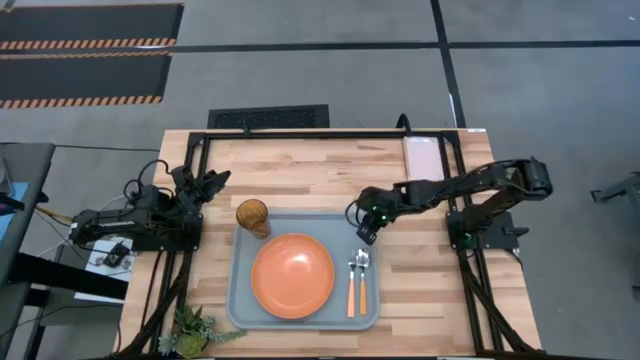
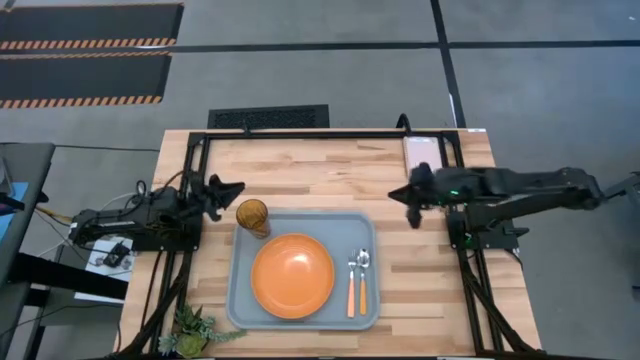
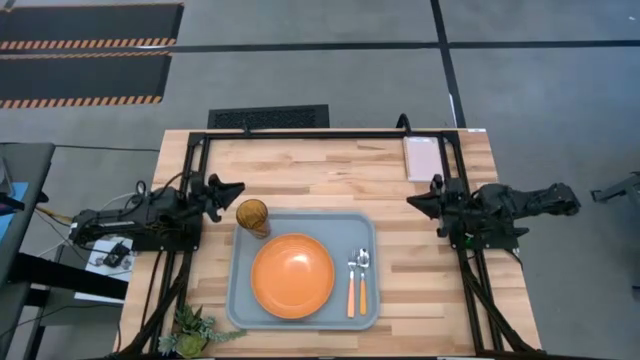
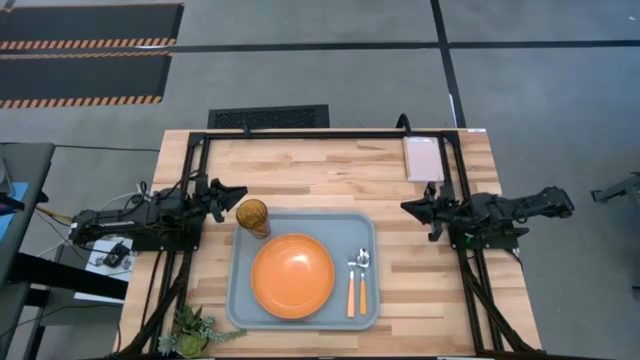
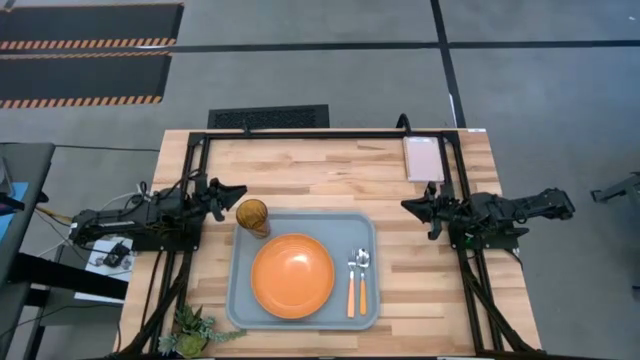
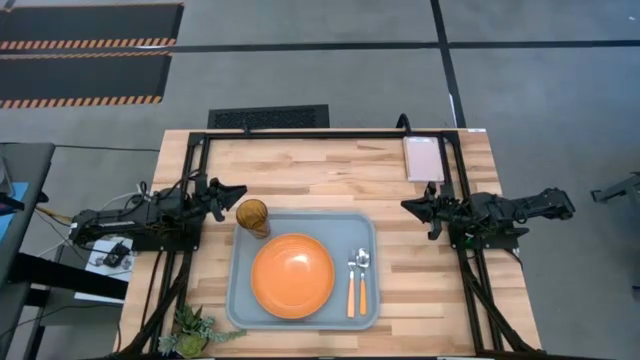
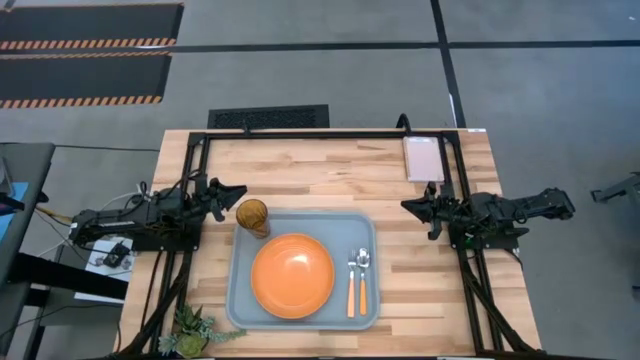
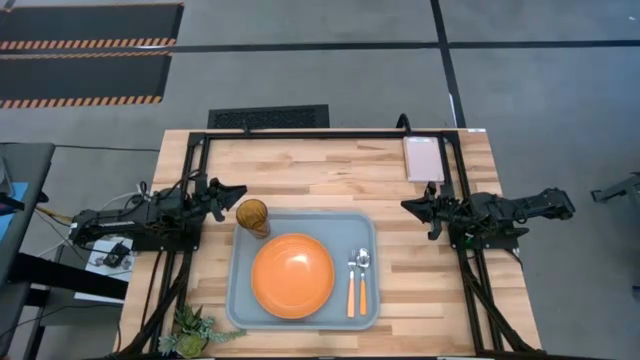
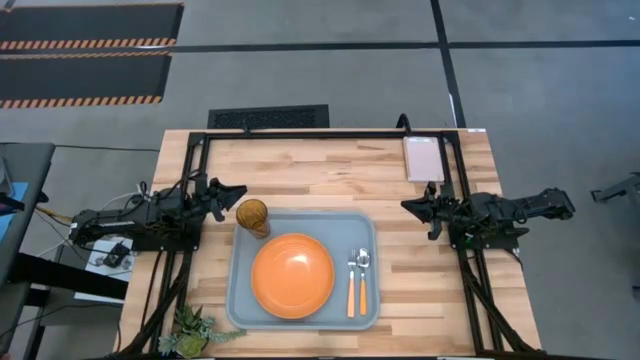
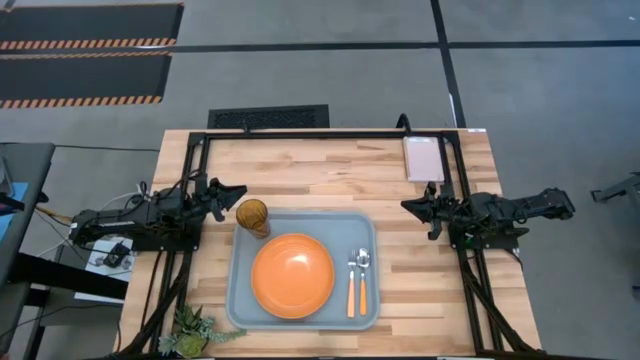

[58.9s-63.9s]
Task: Pick and place plate/cup/fork/spoon on tray
Return to Home Position

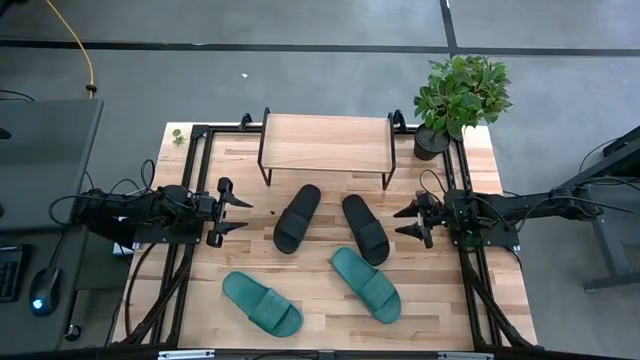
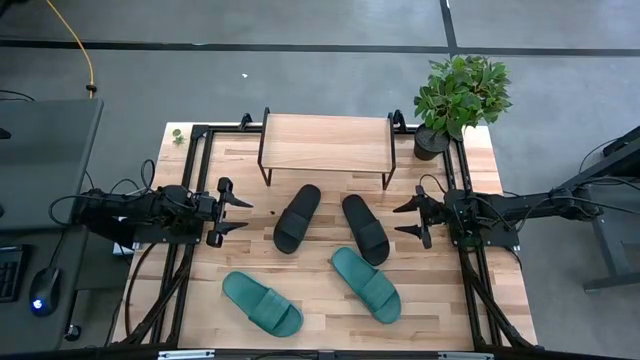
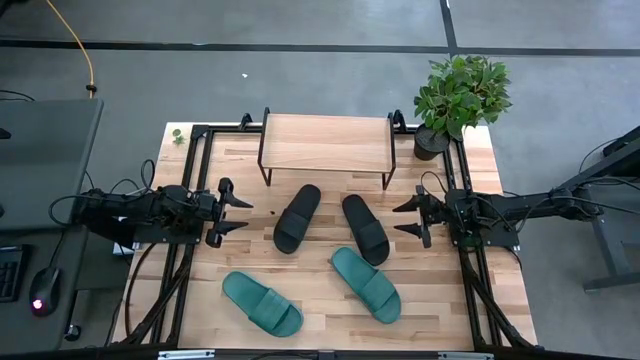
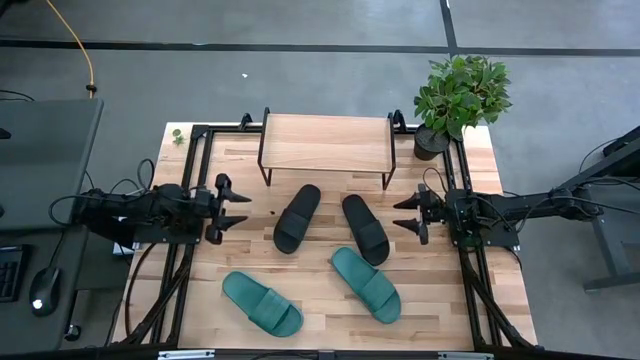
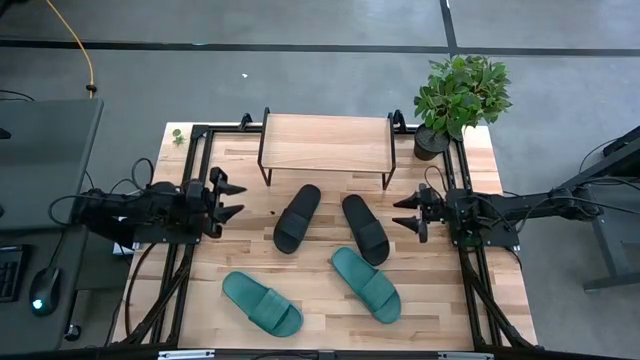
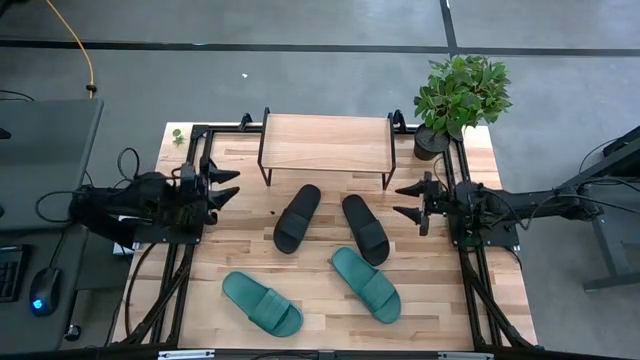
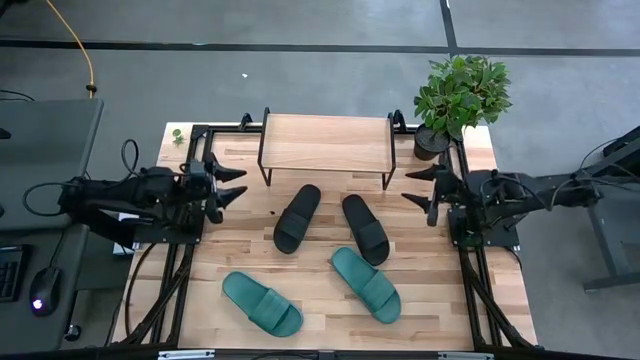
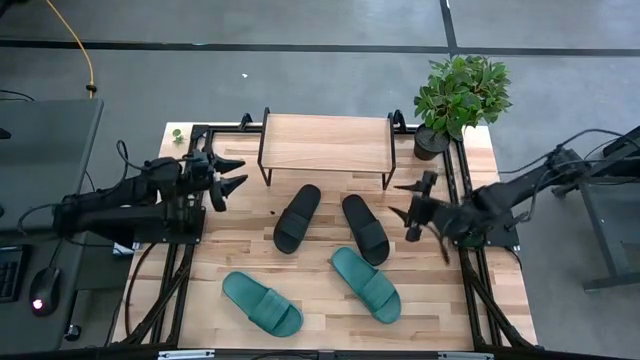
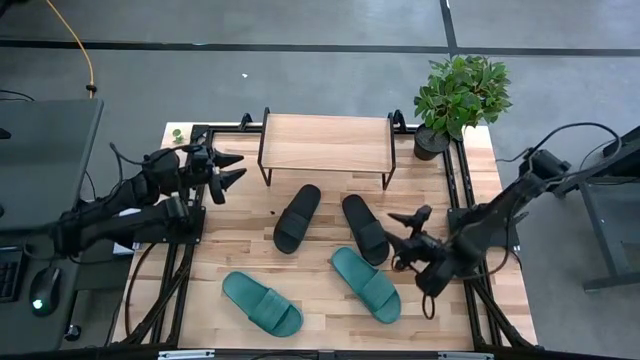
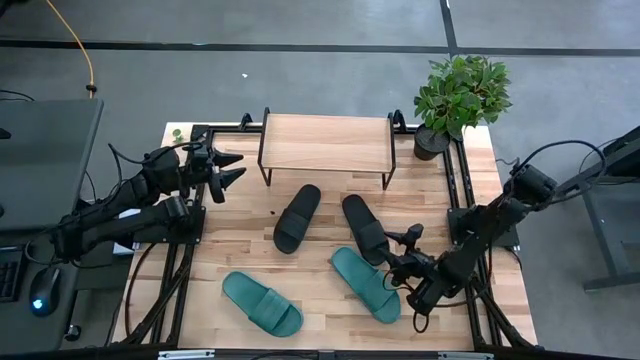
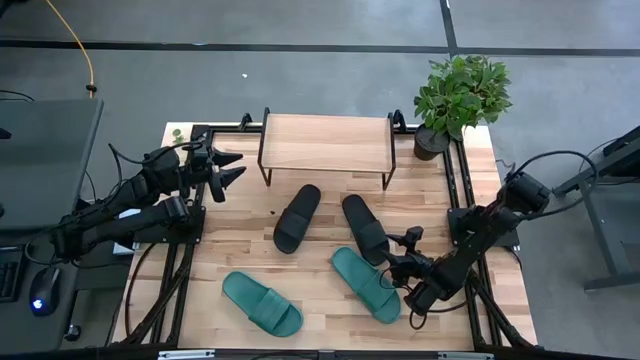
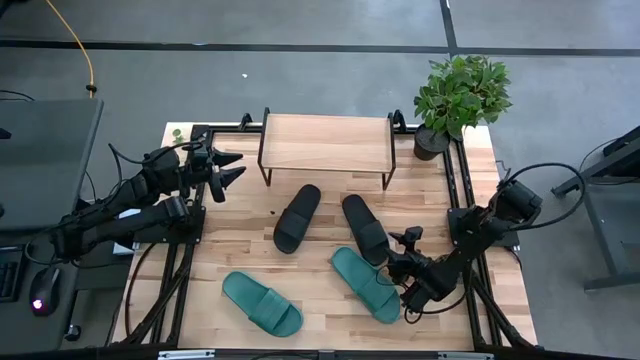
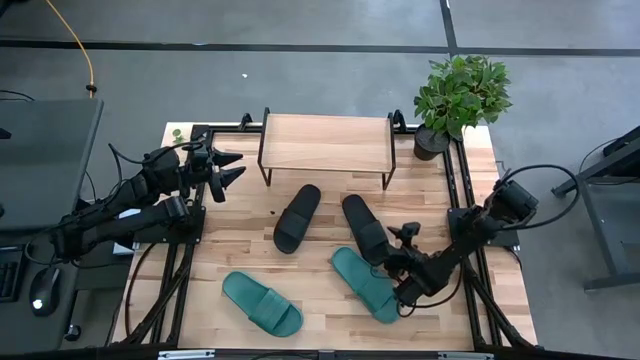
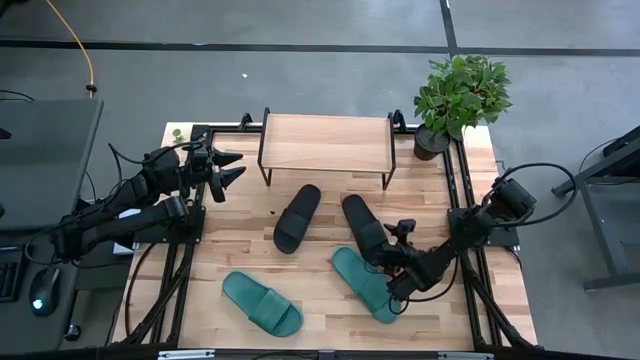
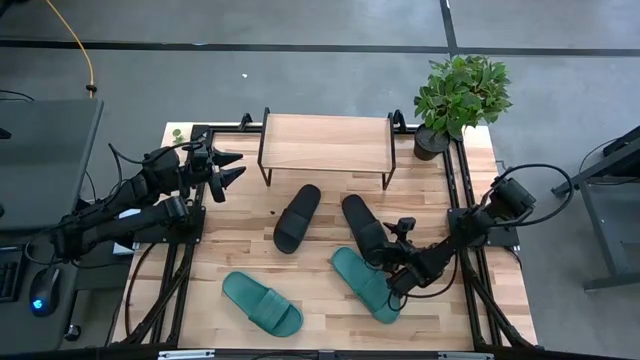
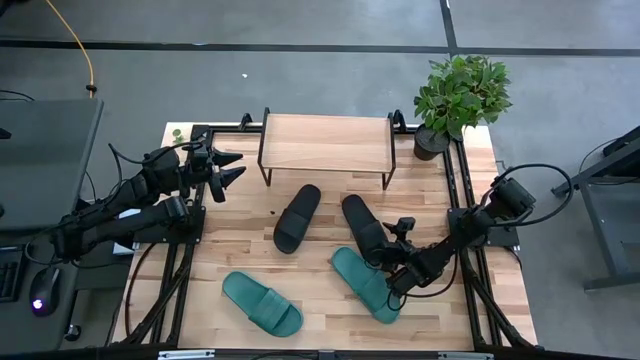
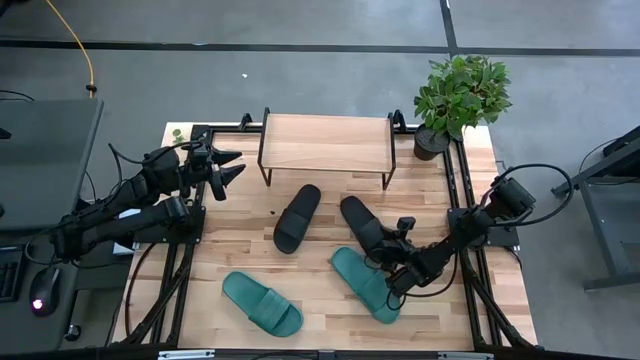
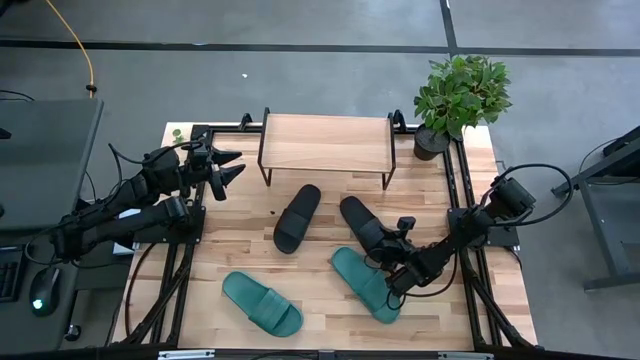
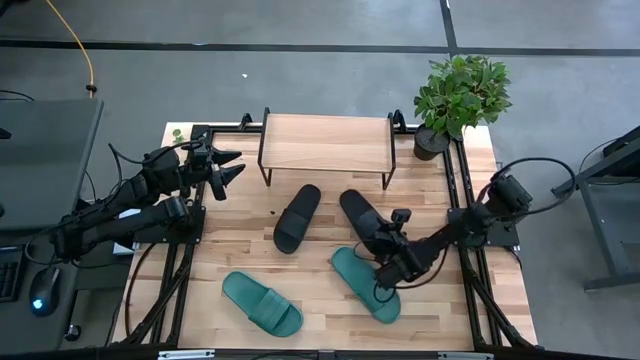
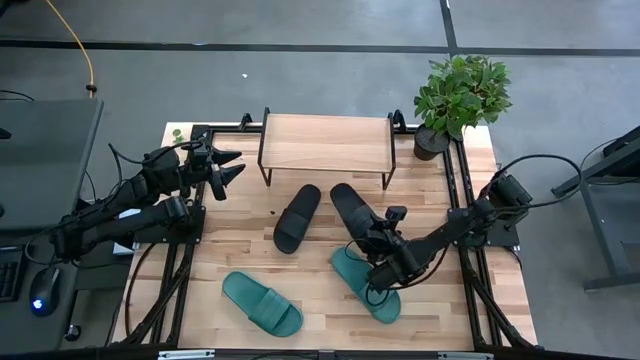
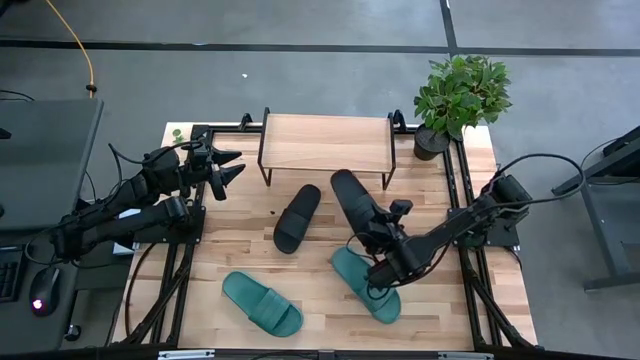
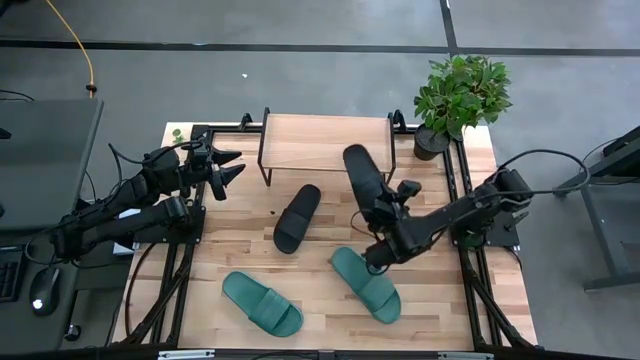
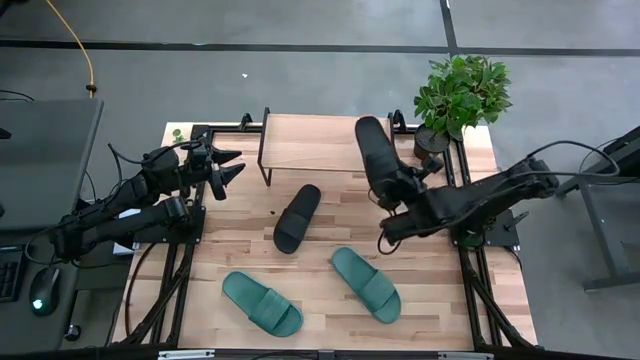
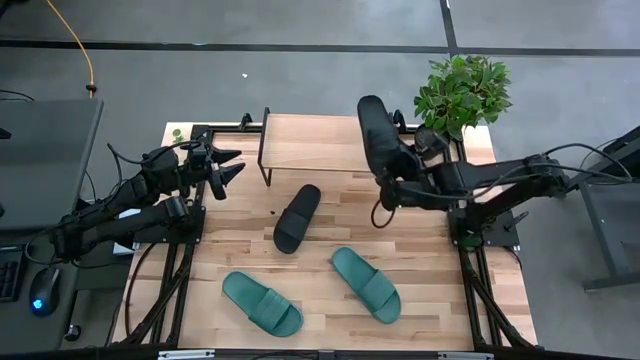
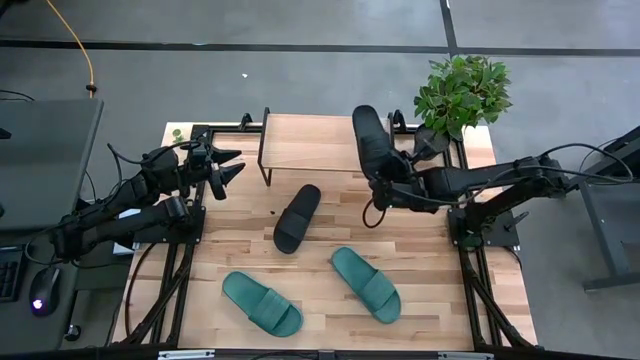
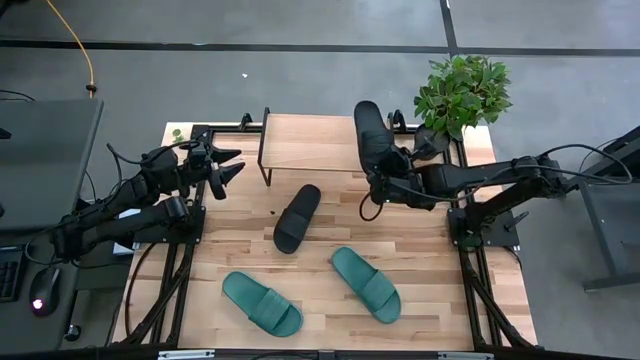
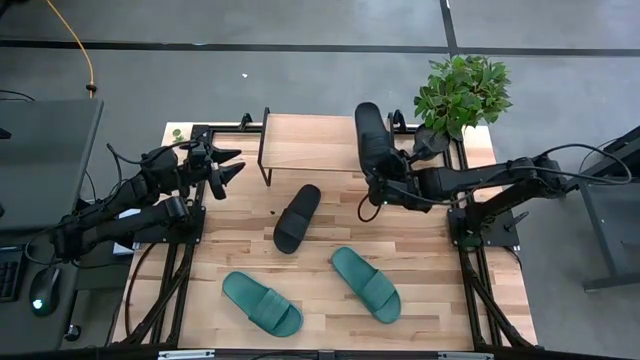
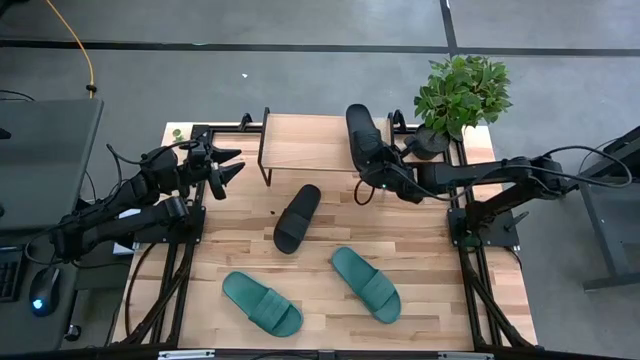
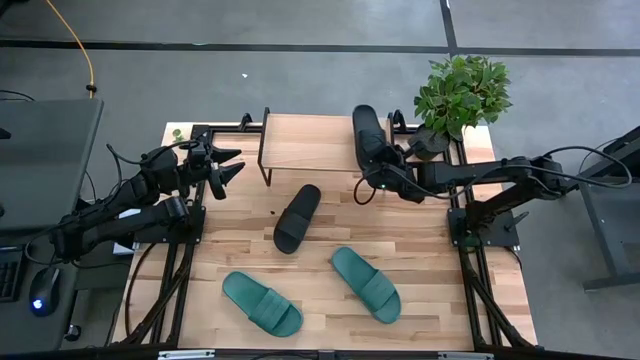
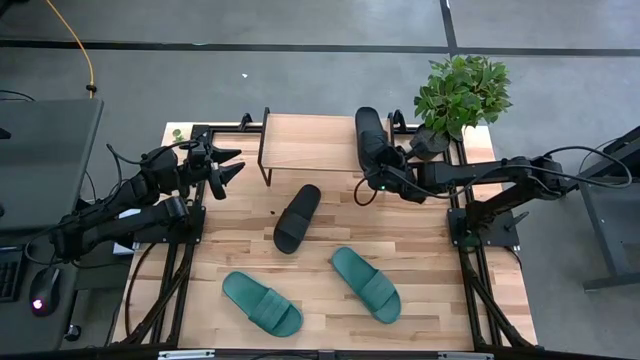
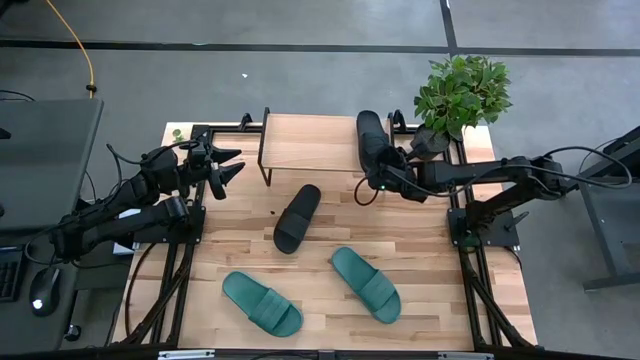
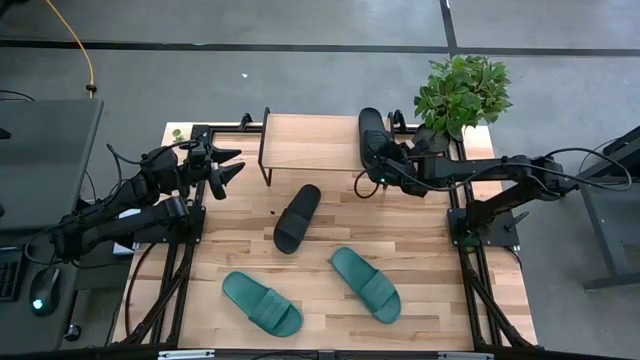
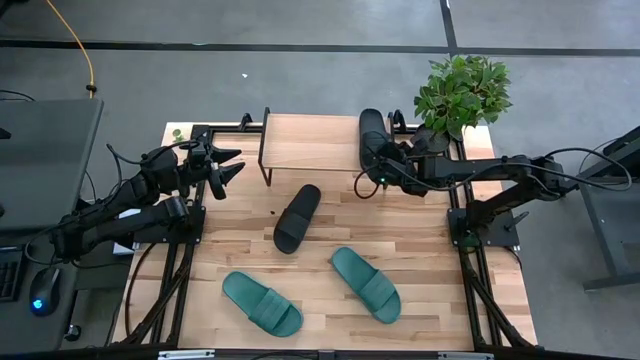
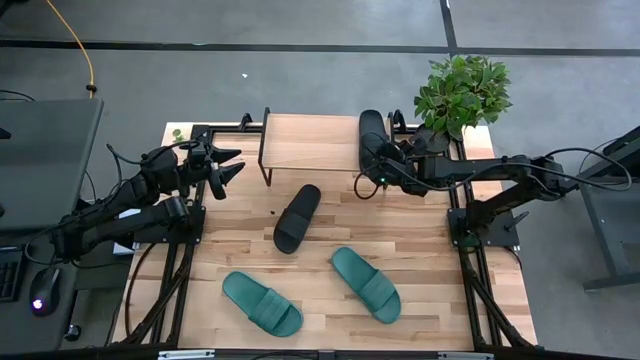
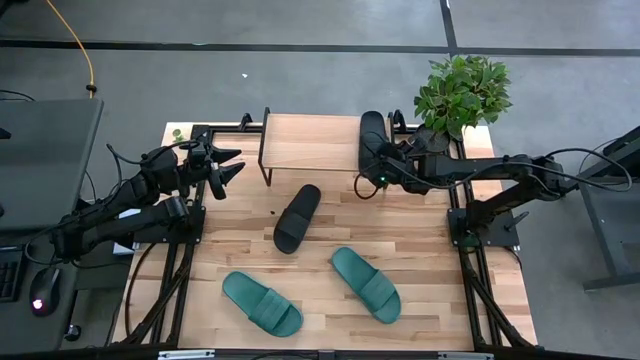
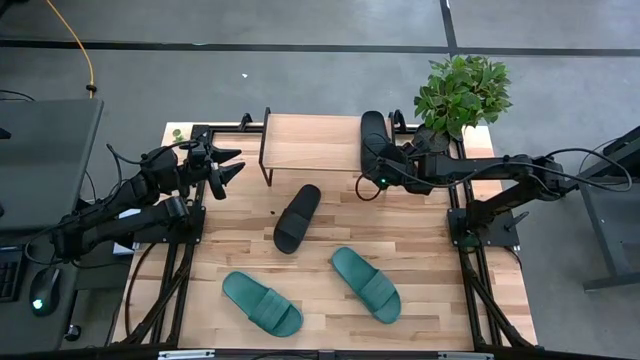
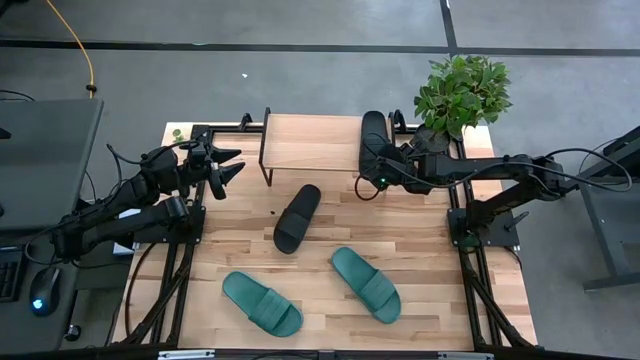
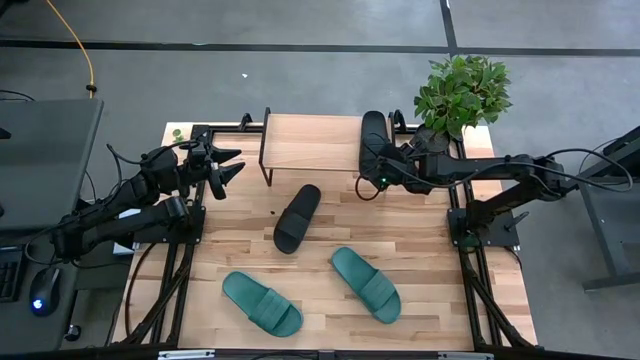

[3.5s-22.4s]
Task: Pick and place slides into the shelf
Put the right black slipper on the shelf
